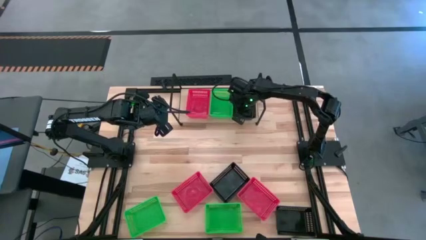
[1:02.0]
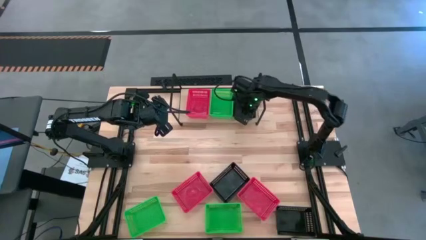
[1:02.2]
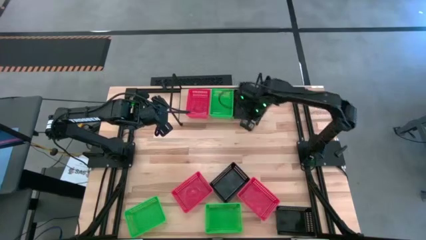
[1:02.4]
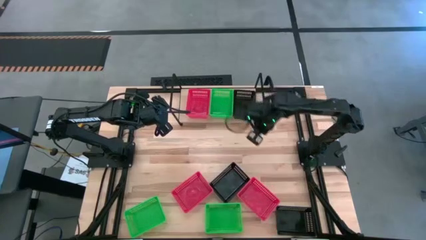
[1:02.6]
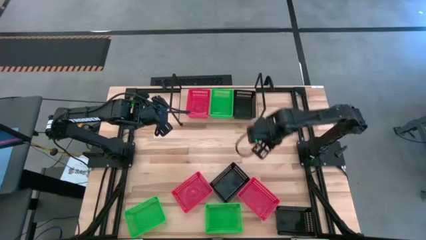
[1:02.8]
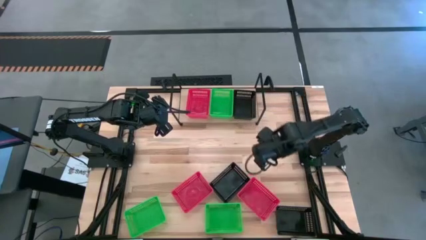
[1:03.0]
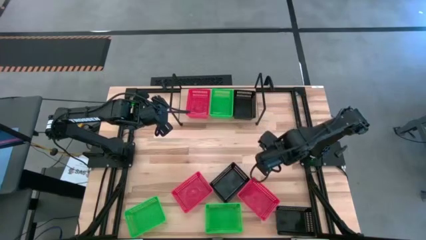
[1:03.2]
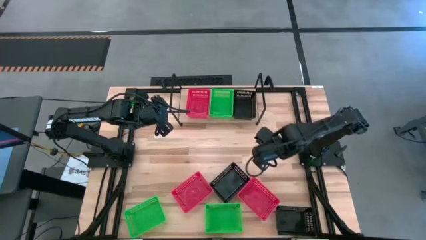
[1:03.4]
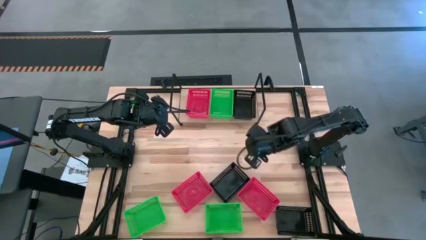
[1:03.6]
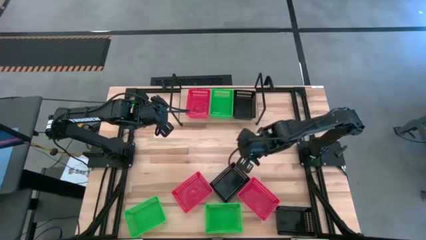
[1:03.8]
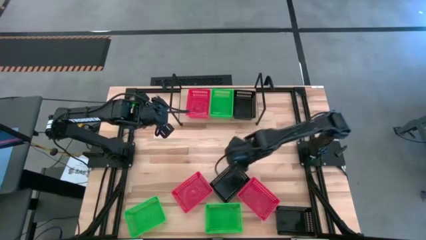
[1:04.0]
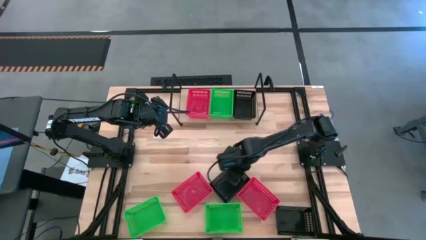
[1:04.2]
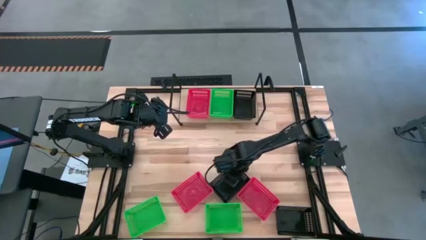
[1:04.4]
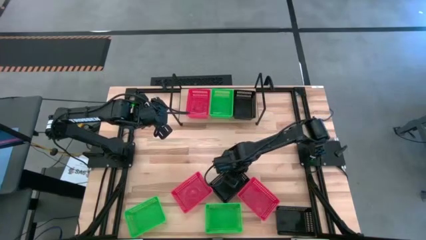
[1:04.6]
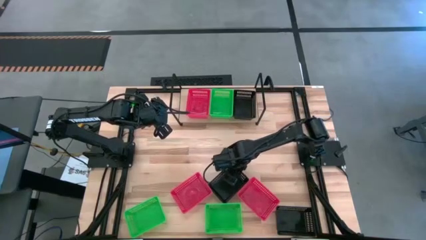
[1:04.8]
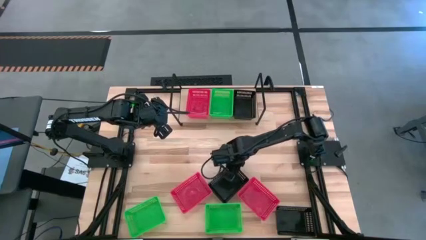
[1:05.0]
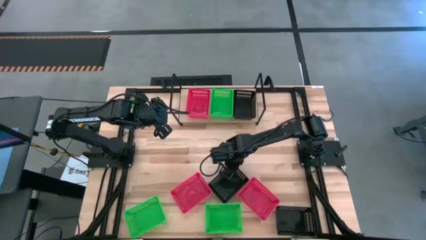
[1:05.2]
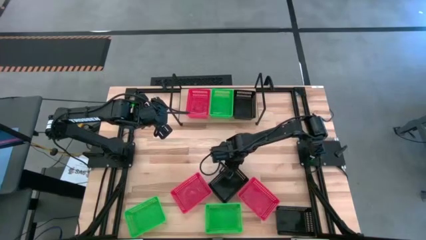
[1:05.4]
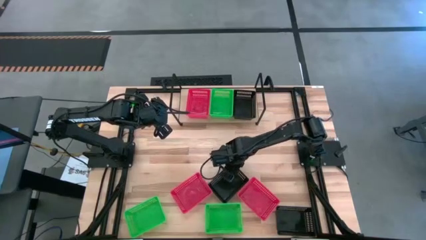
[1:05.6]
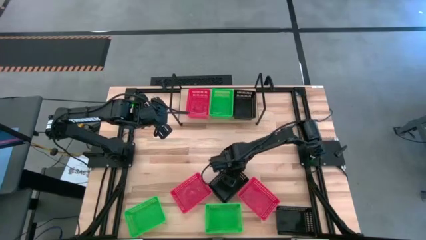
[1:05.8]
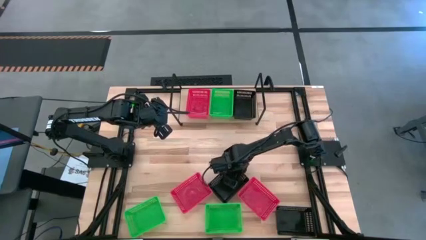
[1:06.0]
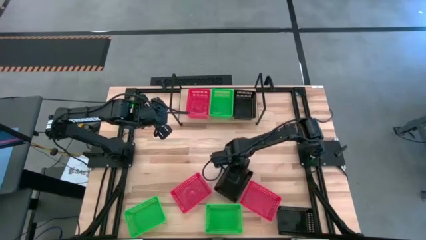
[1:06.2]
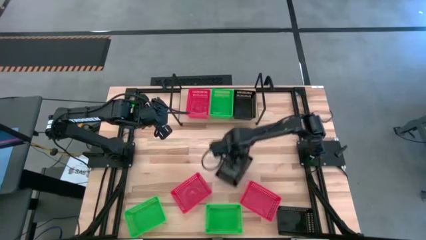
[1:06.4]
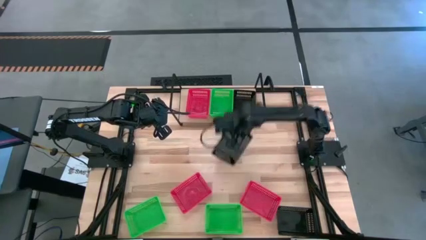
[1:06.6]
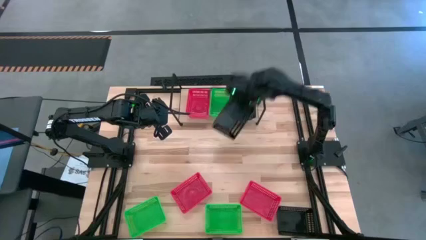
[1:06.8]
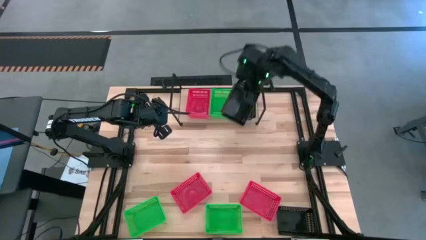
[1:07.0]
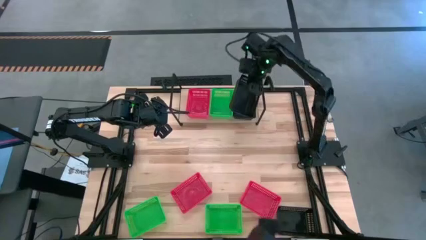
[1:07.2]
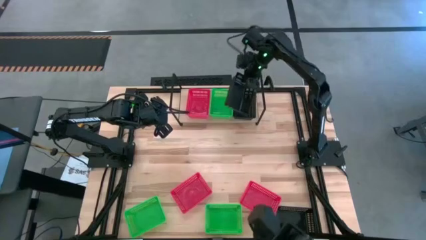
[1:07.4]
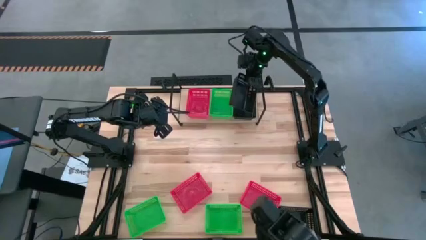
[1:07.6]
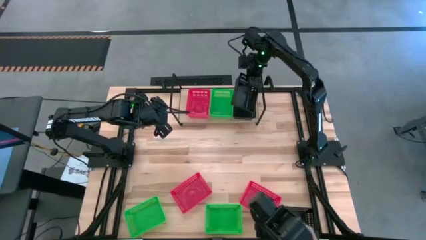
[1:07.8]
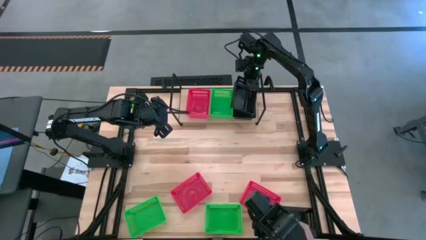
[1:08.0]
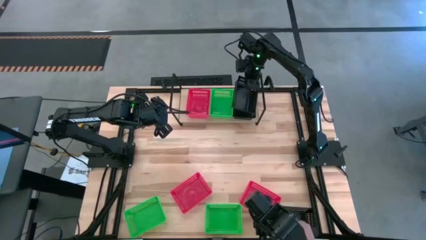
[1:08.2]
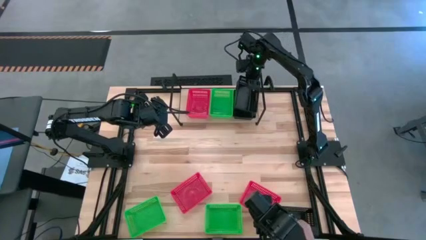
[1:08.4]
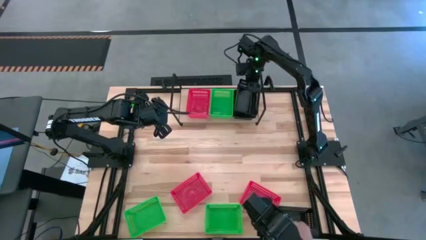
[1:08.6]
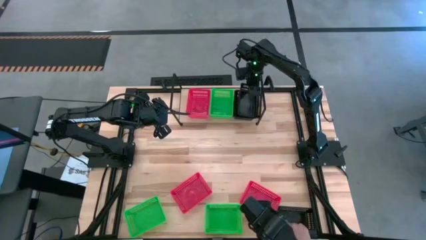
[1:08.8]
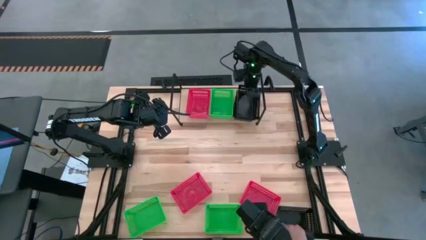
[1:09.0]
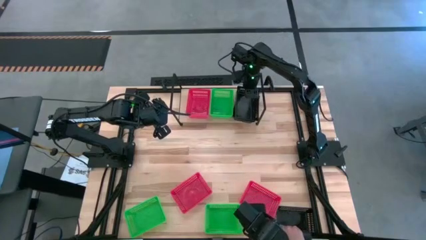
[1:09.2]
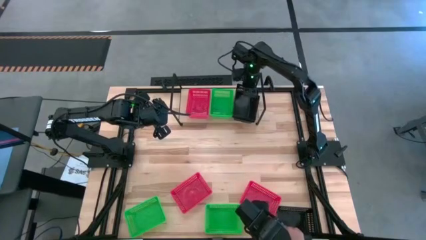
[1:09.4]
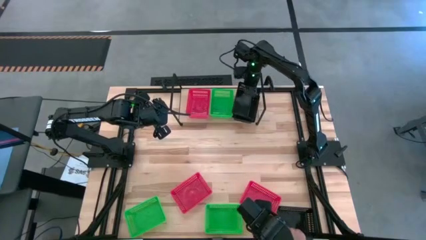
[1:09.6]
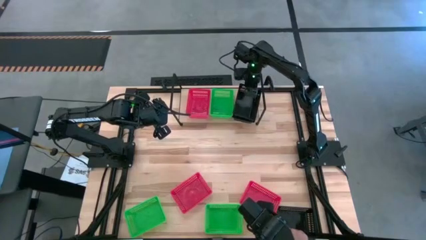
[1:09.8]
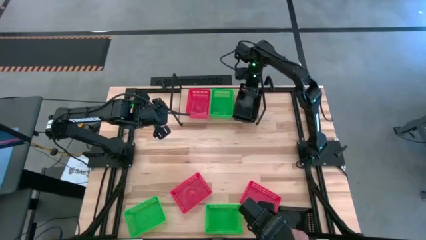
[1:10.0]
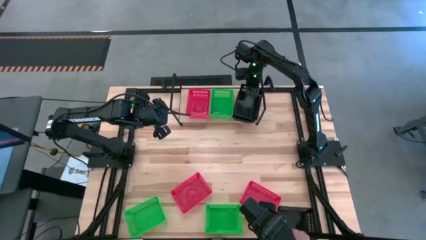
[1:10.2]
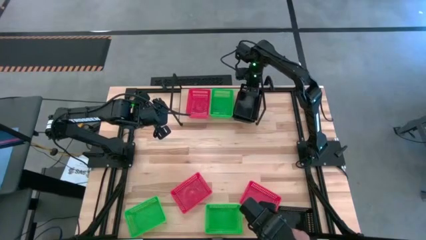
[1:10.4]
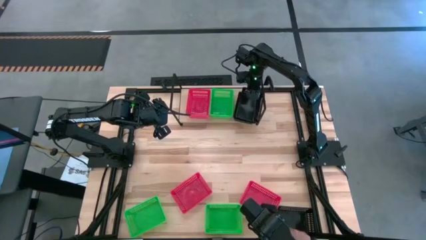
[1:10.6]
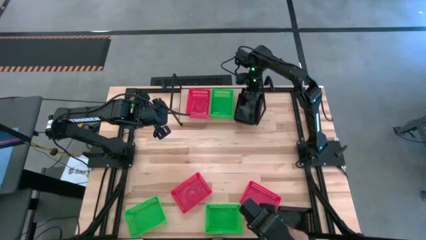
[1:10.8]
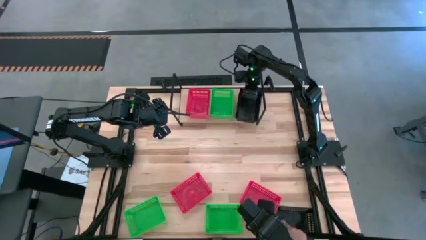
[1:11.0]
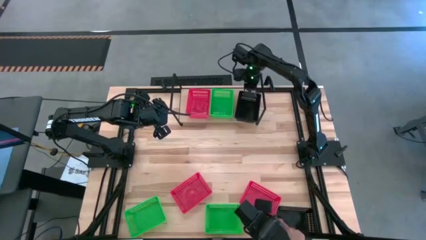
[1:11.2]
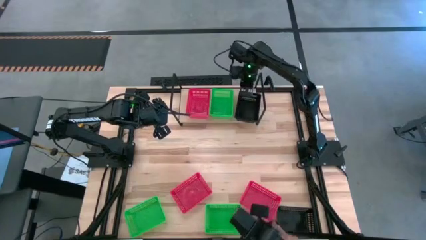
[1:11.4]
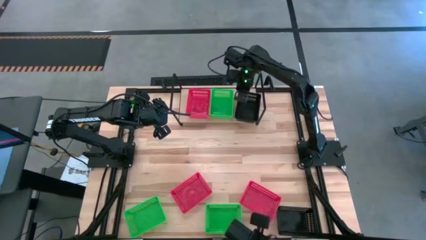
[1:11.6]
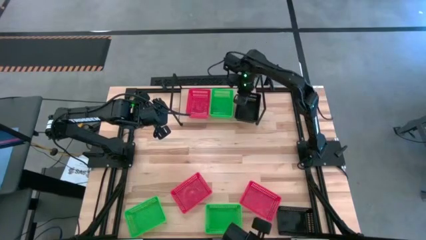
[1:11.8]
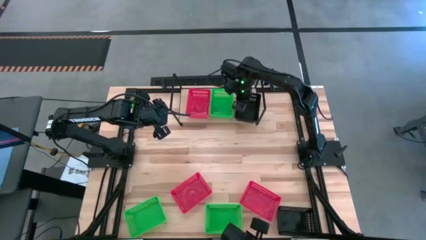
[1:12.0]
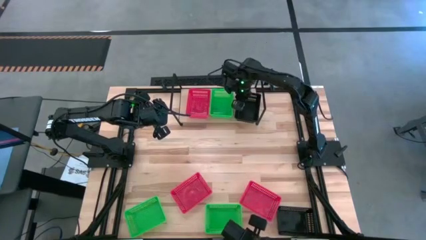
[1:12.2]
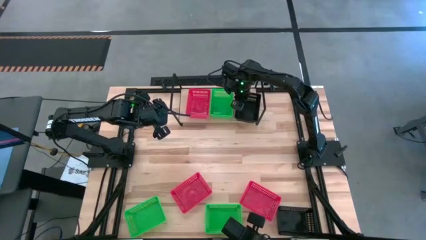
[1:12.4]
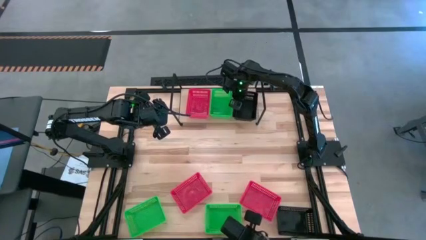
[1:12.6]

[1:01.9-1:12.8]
Task: Stack baskets on shelf by color
Stack the top black bin on top of the other black bin on the shelf

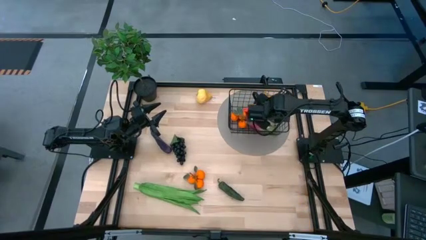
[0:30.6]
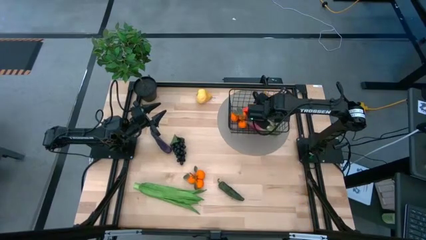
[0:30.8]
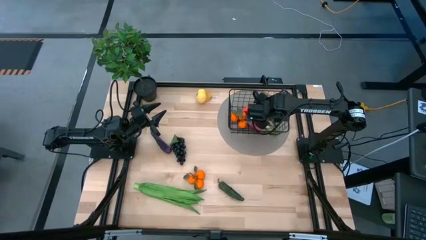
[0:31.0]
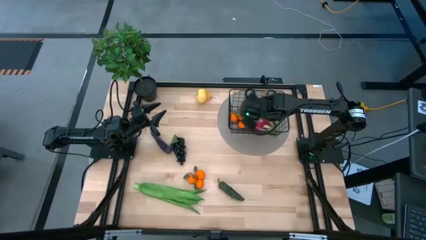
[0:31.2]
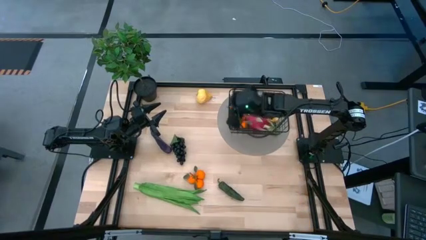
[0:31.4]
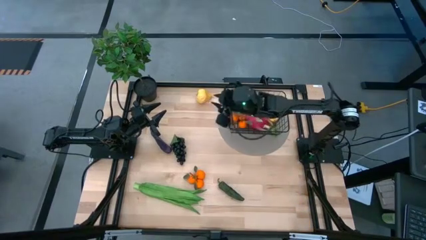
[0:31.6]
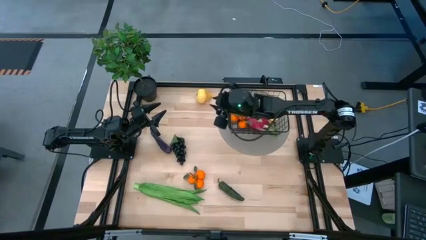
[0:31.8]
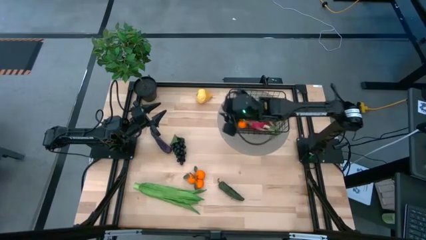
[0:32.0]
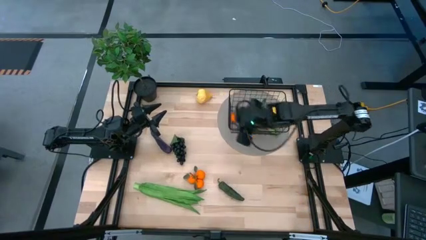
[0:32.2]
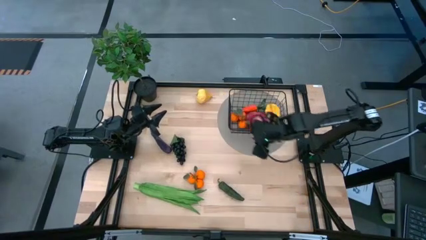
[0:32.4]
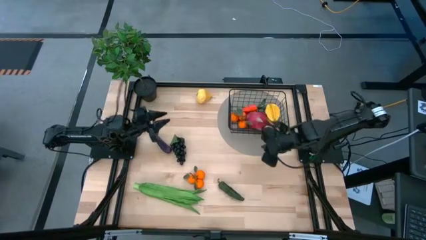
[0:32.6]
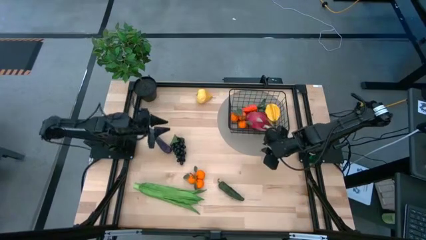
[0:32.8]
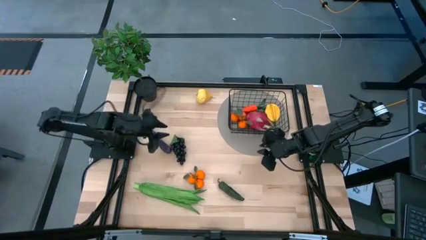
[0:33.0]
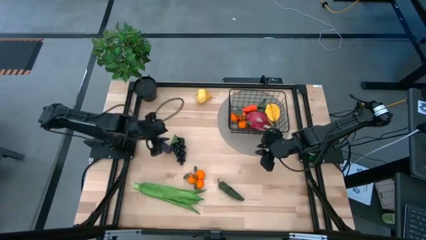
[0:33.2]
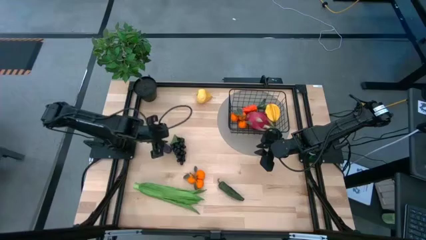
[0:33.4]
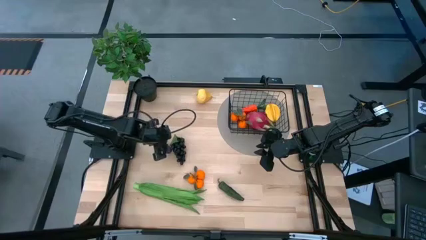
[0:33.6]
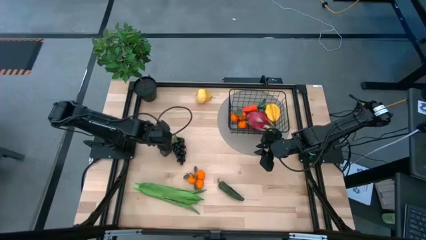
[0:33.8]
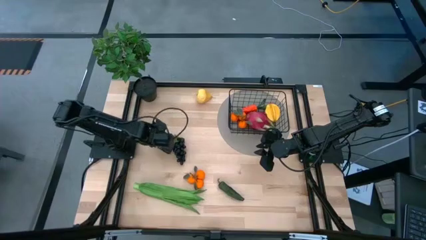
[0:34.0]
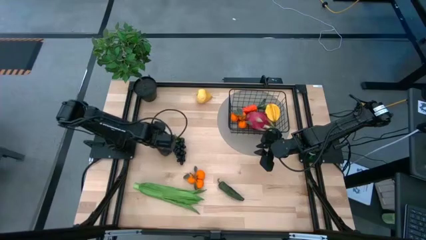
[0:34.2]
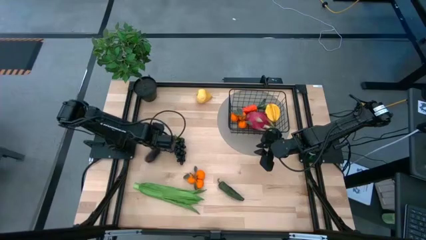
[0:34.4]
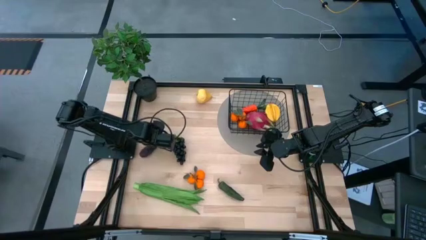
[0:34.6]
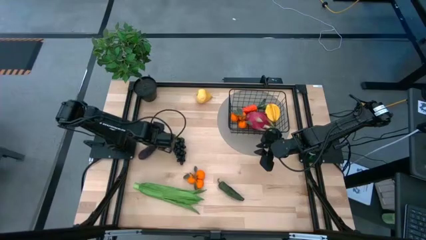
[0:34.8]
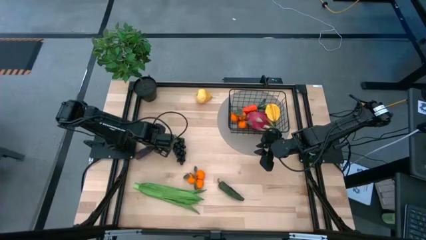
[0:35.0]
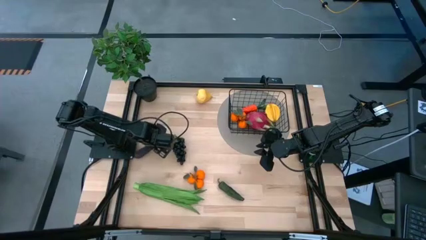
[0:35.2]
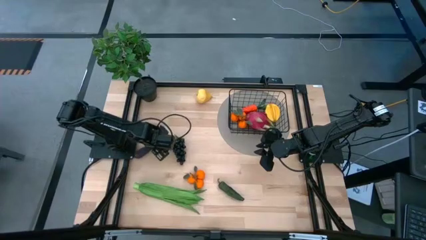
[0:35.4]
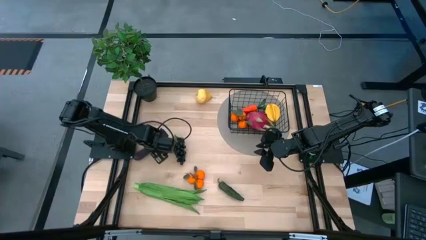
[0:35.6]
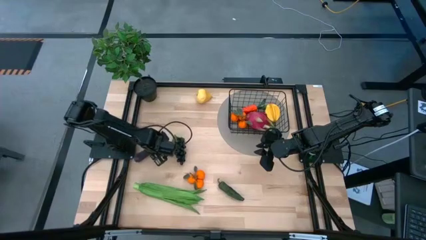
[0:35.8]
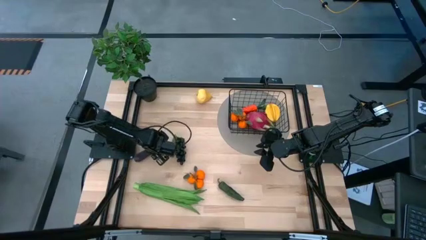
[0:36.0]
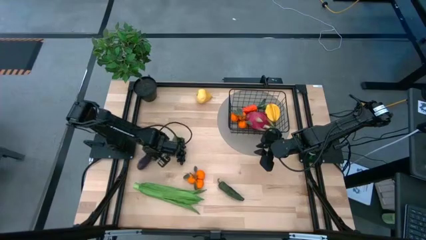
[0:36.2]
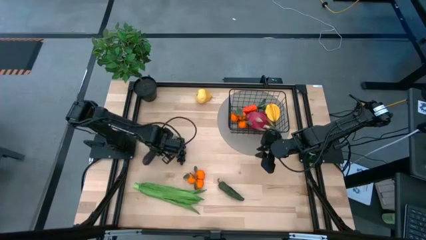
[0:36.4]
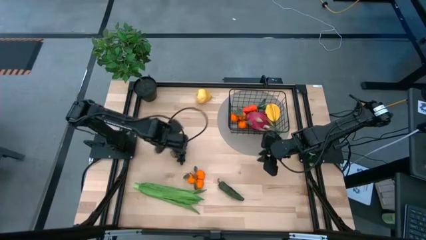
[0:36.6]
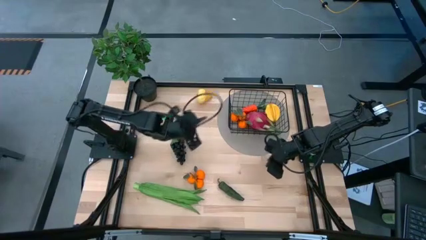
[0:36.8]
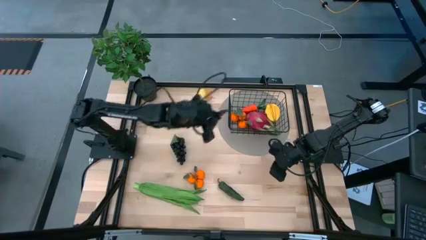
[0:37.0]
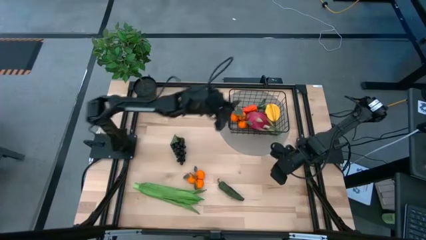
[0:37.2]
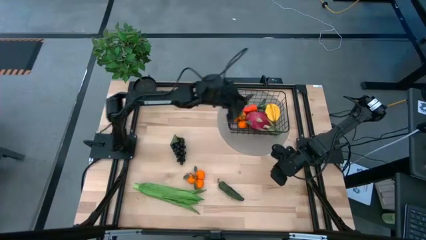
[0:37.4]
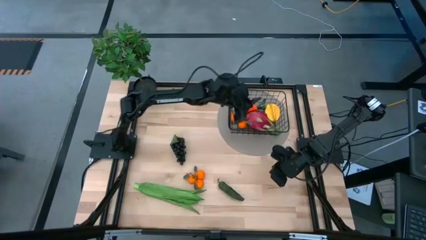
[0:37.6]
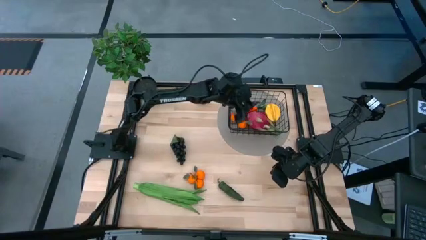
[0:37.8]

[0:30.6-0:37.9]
Task: Build produce basket
Put the eggplant into the wire basket
